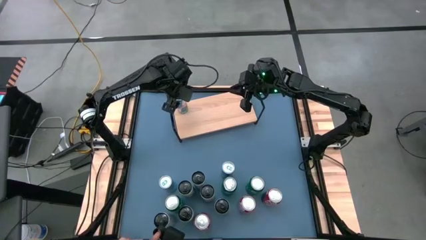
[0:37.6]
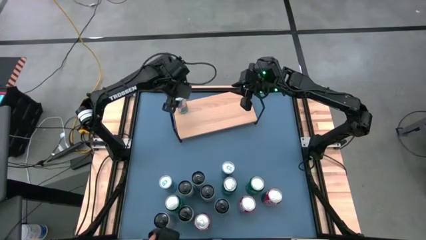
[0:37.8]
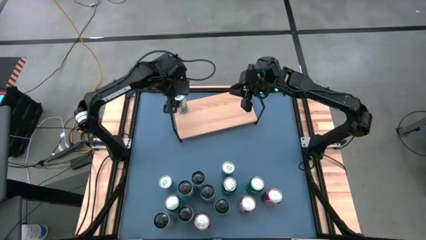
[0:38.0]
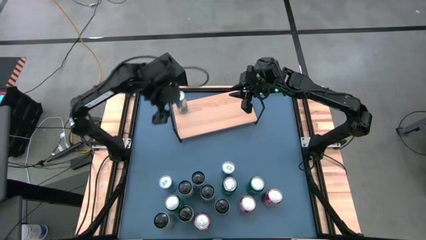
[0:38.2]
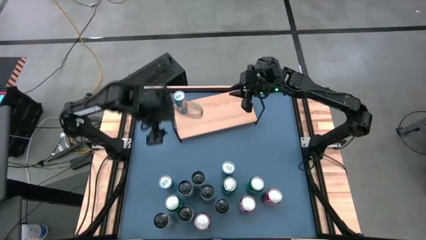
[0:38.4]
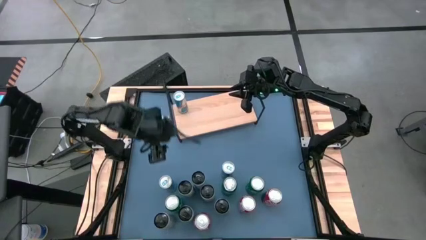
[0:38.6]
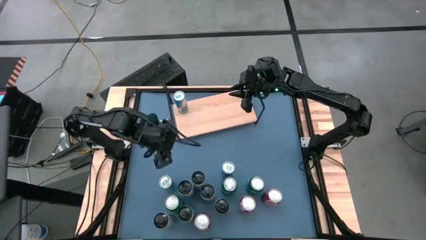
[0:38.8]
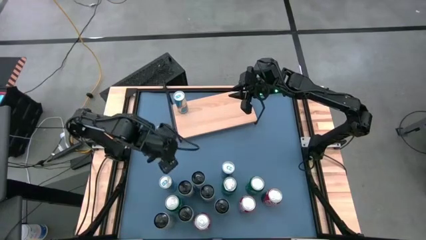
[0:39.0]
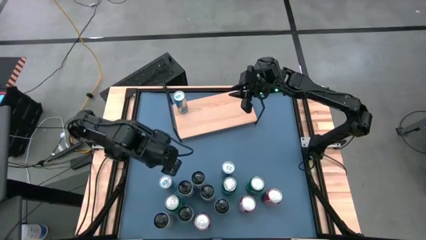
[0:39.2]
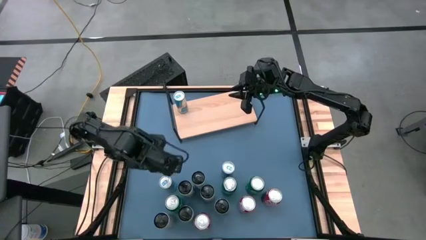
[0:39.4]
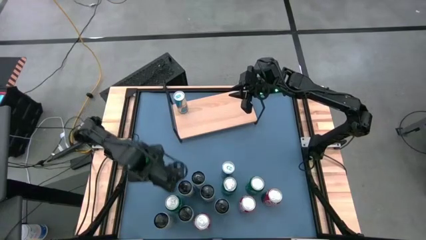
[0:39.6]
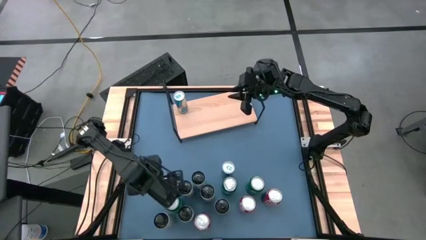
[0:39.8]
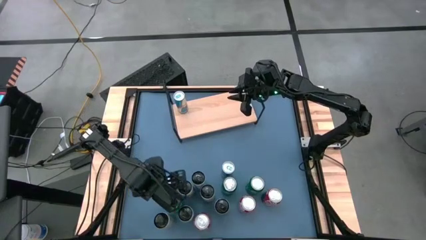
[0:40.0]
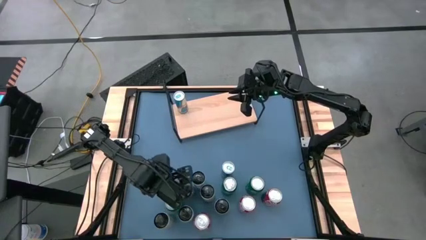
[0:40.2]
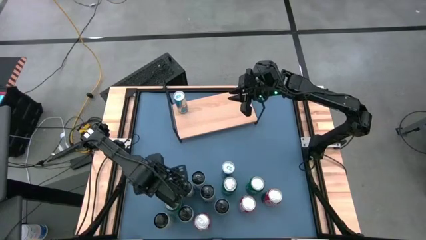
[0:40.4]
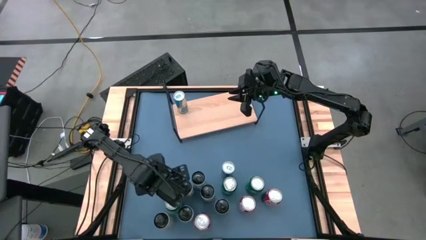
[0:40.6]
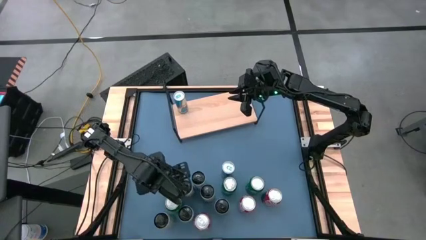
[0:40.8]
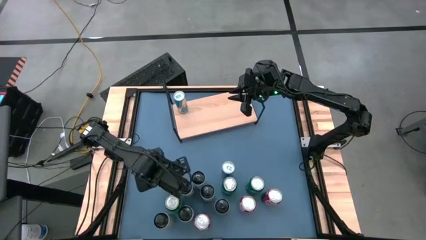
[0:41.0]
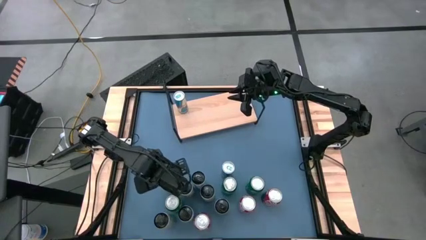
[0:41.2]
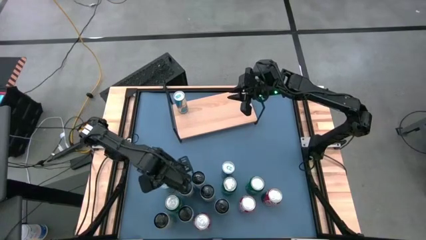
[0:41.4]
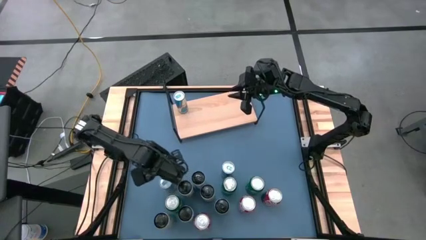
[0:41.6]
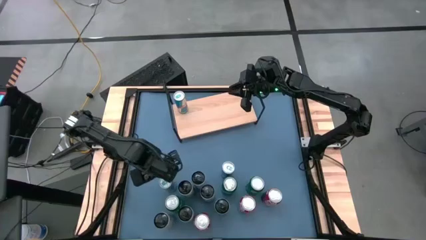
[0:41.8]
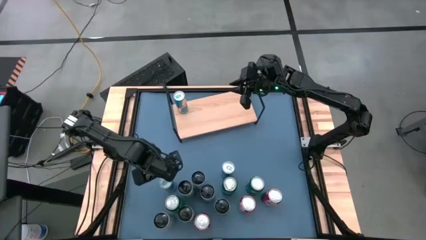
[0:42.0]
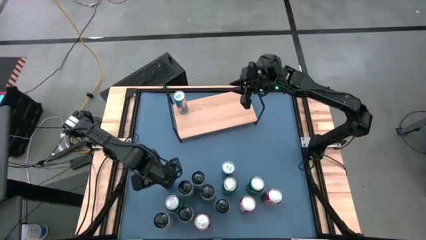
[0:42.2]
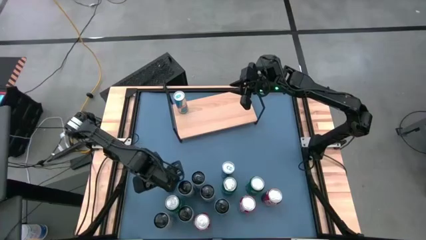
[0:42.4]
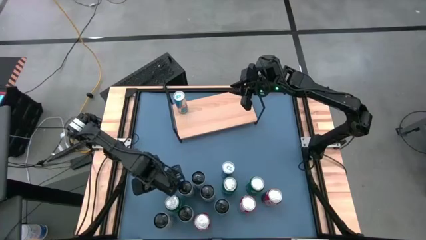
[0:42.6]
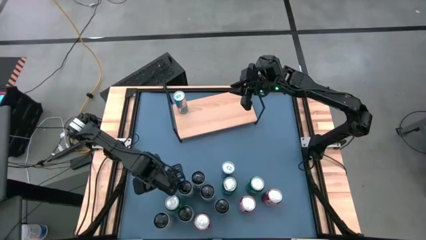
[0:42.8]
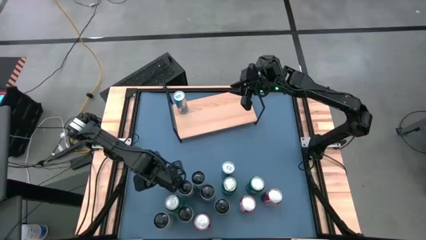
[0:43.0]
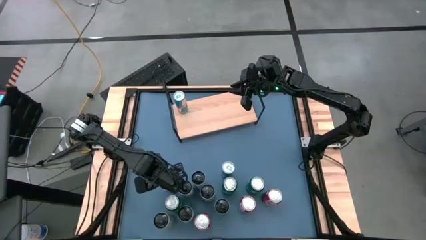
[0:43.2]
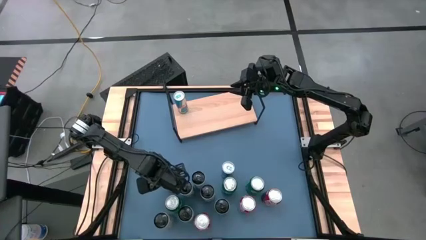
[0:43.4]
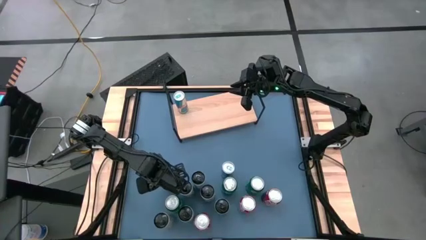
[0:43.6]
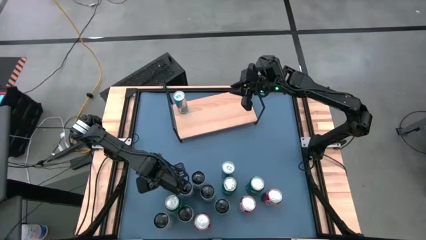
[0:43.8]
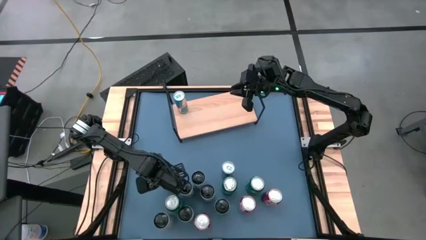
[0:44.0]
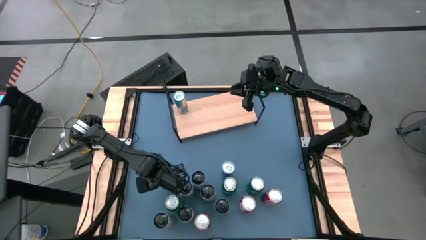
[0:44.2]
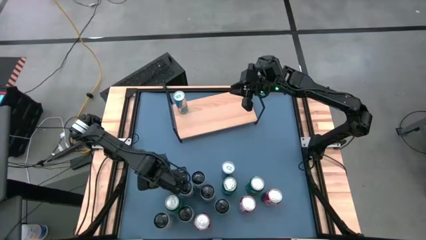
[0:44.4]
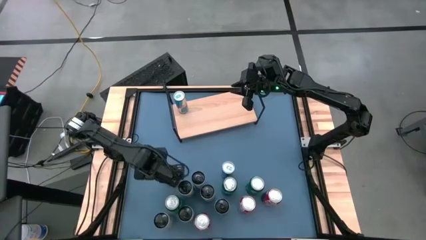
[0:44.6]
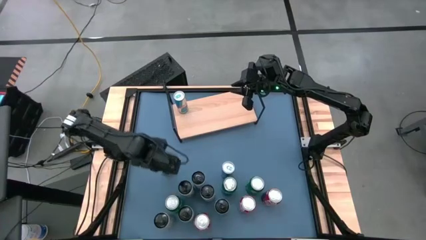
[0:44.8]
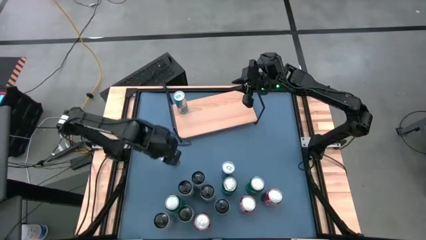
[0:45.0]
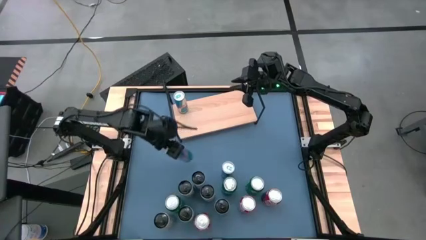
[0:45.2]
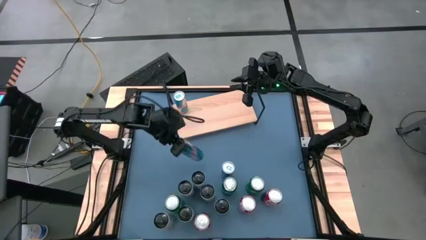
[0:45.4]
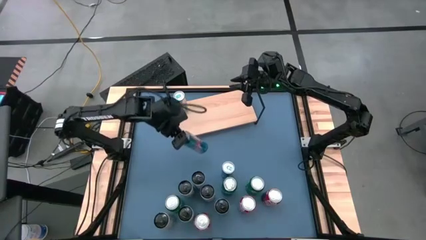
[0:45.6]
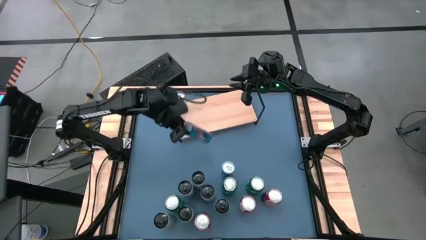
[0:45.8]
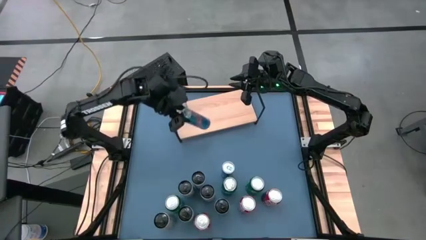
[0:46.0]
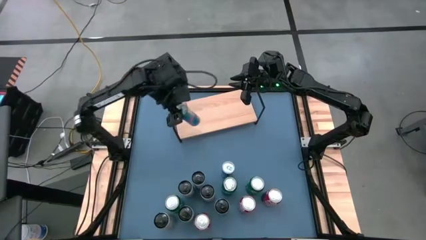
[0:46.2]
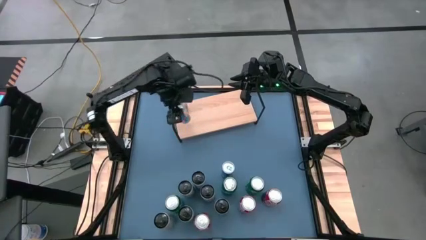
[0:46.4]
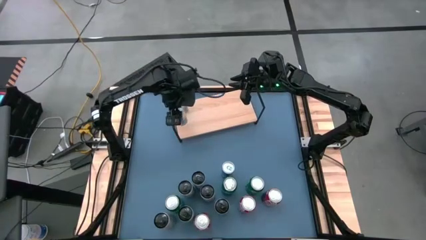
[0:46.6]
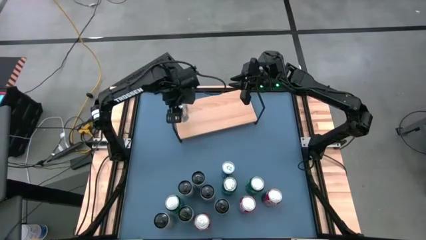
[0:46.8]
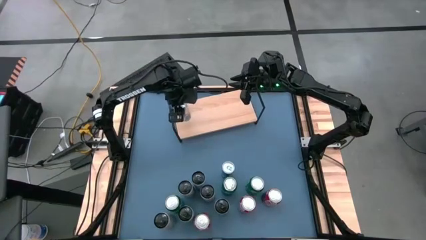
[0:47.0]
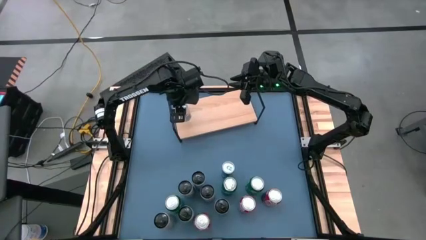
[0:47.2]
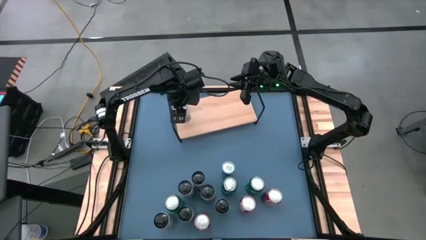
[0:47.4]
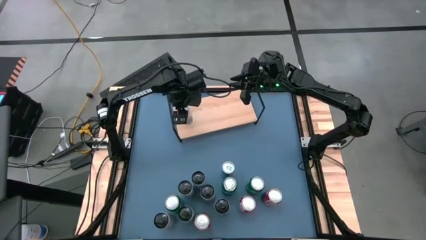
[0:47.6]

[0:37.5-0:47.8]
Task: Place canned beverage on shelf
Put the bottom blue soda can on the shelf aligned with the other blue soda can
